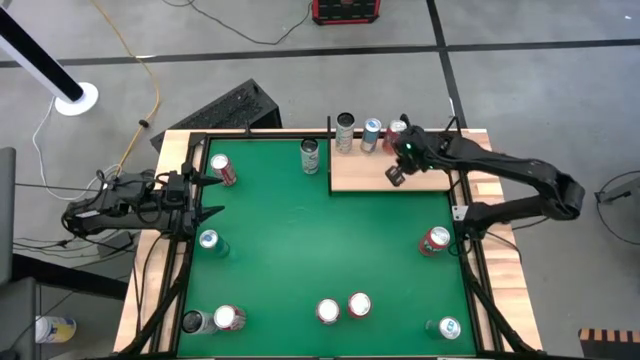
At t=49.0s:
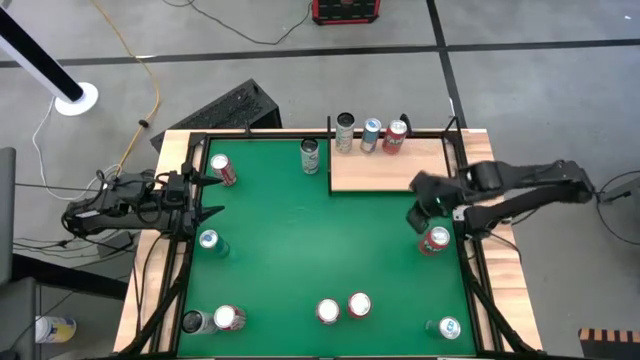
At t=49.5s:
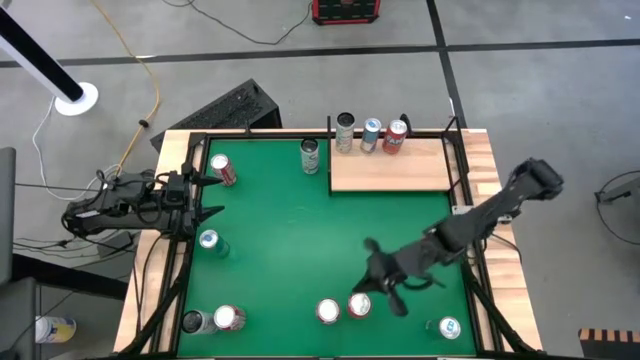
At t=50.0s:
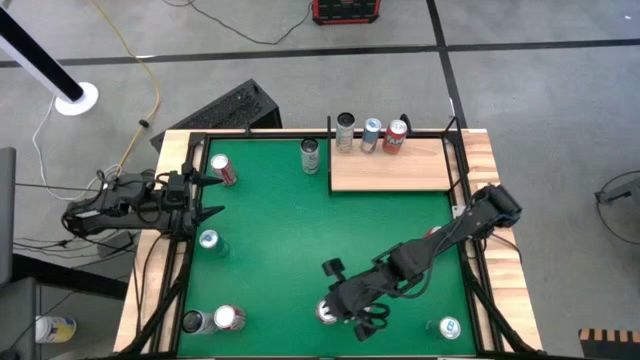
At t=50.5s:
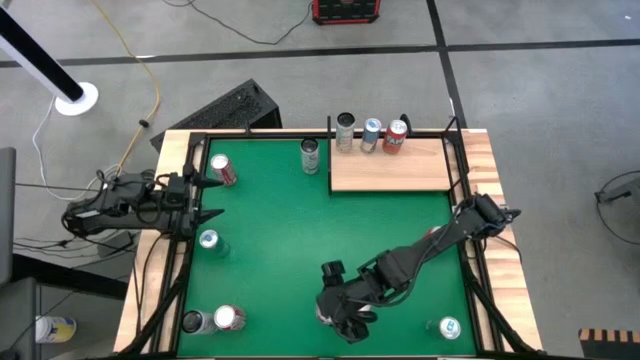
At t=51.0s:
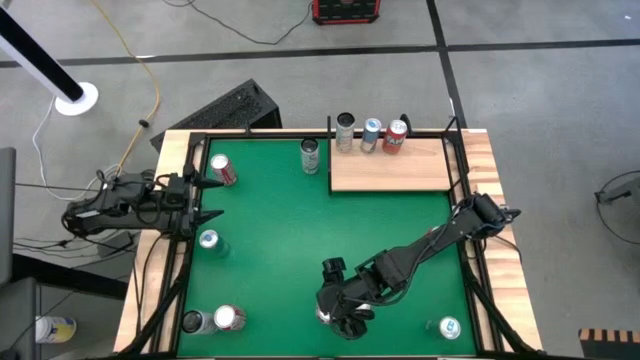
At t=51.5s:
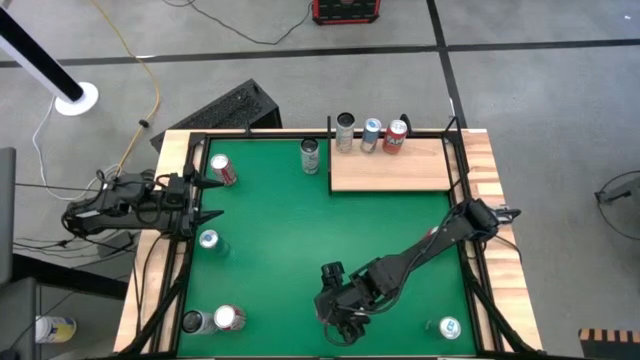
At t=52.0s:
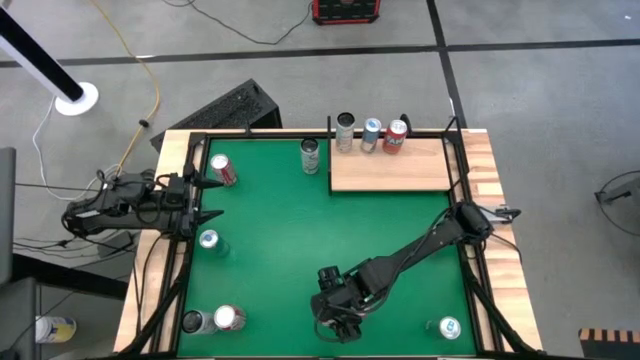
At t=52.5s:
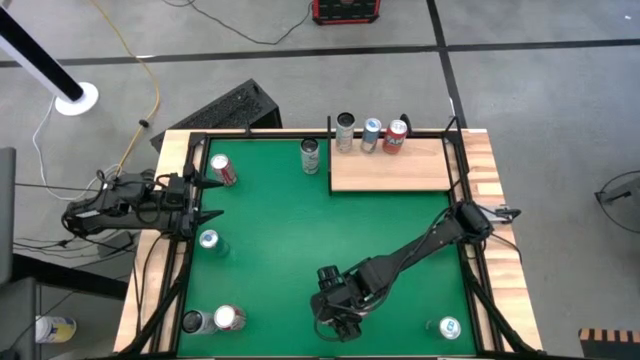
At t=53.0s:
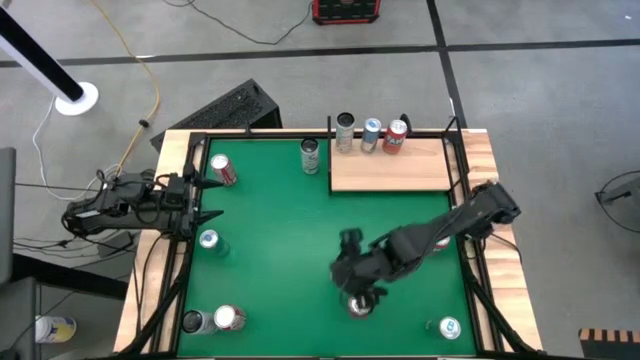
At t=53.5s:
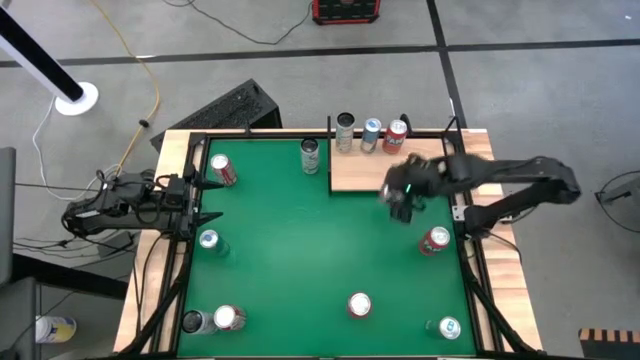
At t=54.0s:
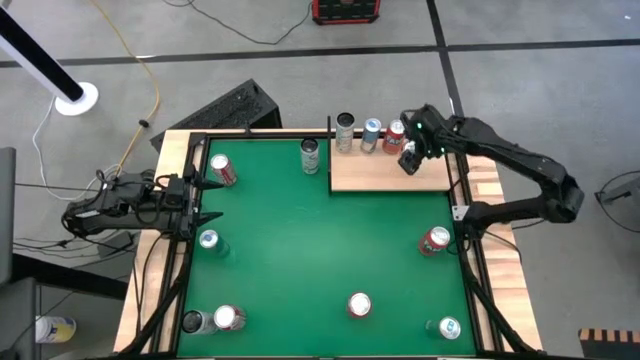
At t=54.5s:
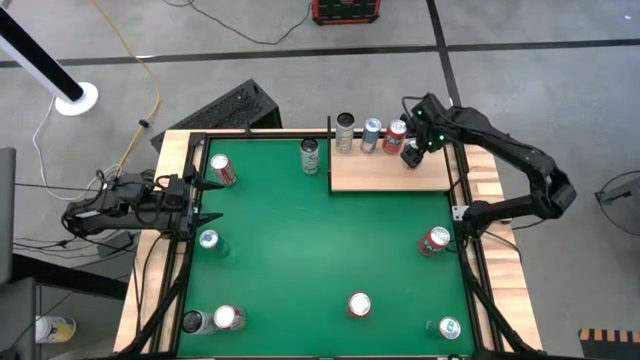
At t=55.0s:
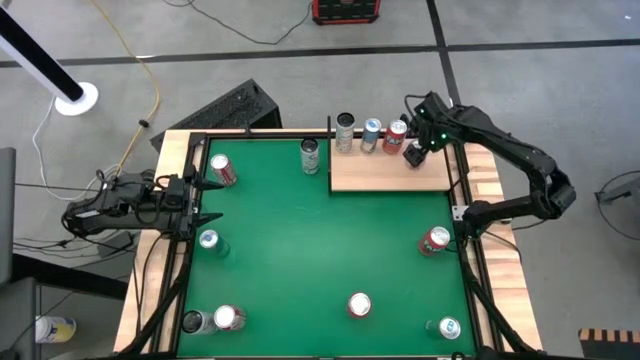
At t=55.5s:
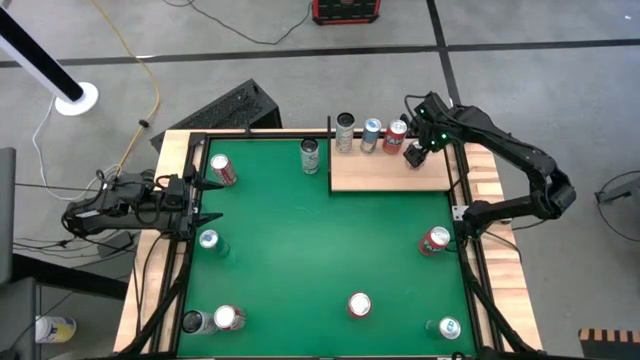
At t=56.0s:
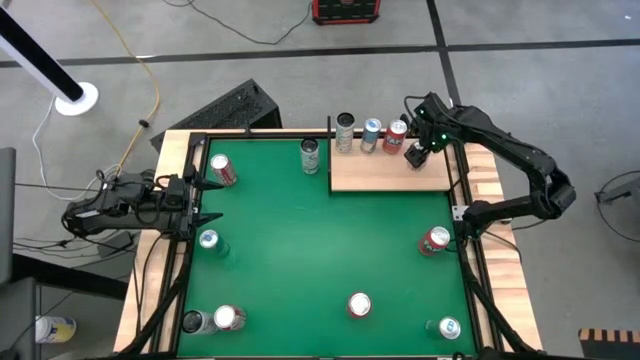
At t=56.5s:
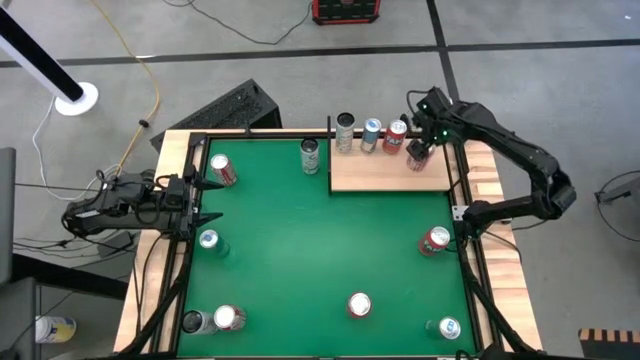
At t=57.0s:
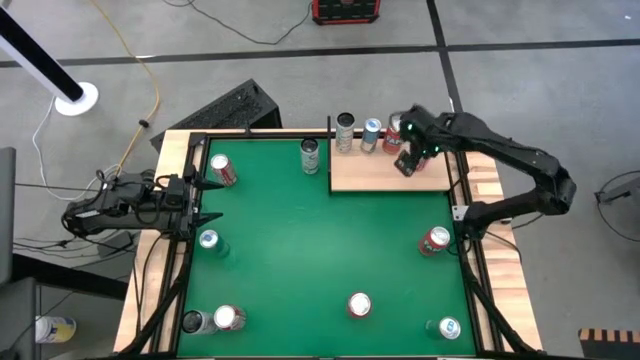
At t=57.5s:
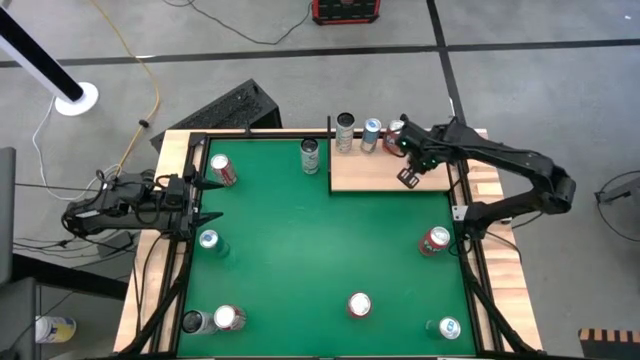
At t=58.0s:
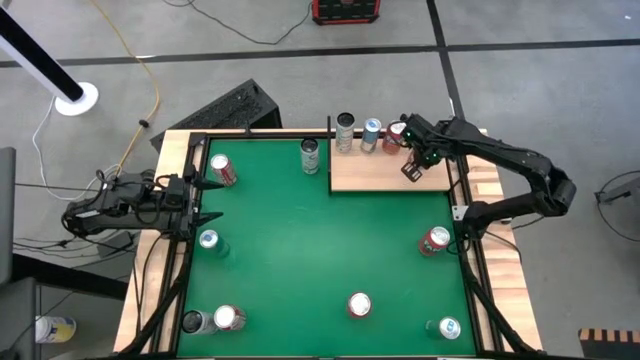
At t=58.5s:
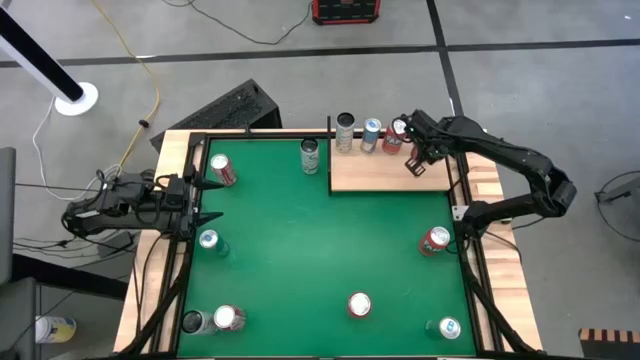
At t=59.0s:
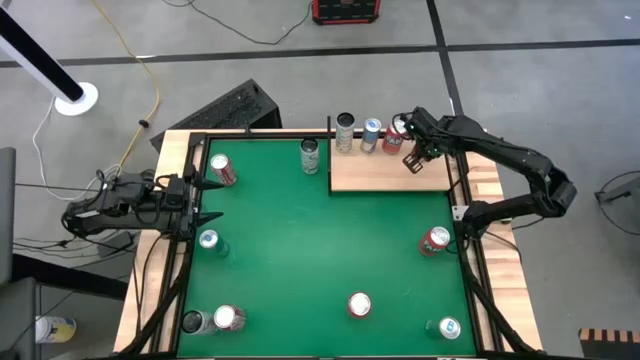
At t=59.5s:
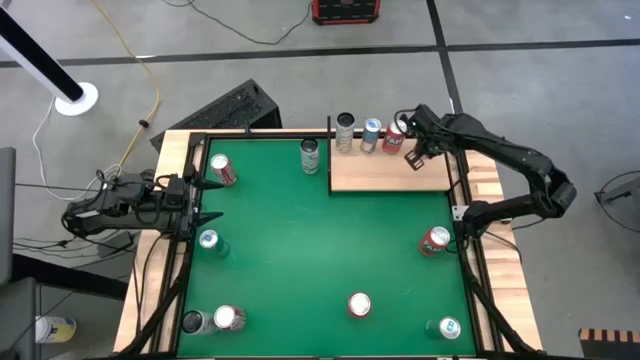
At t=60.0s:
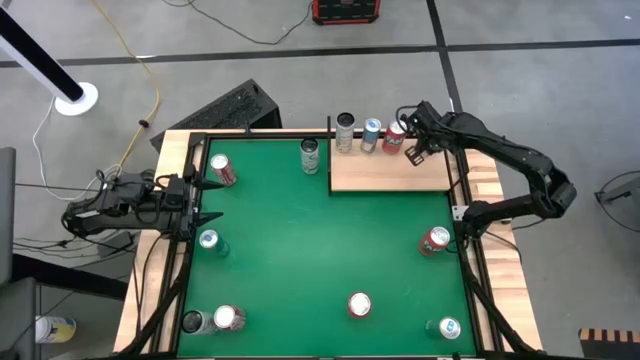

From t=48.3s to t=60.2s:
Task: Sort soda cans
Put the bottom right red soda can on the shelf
